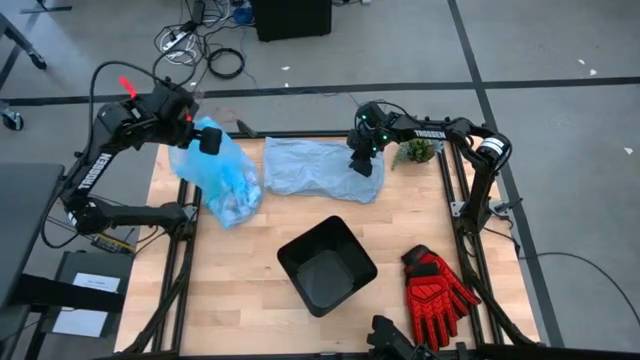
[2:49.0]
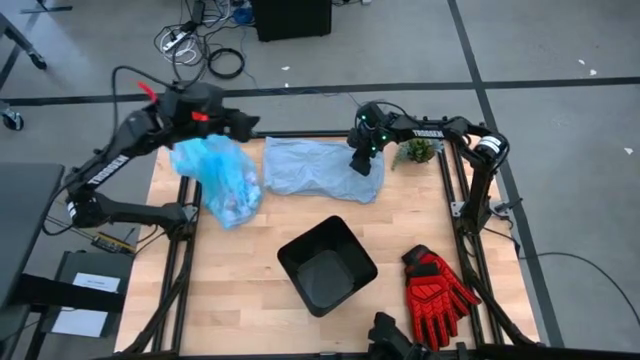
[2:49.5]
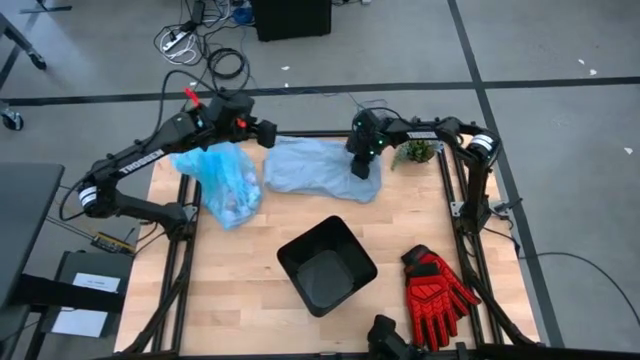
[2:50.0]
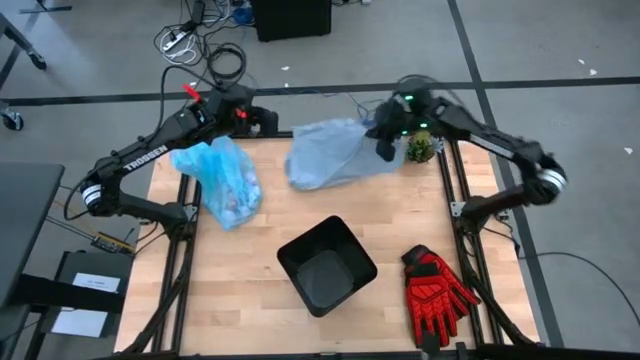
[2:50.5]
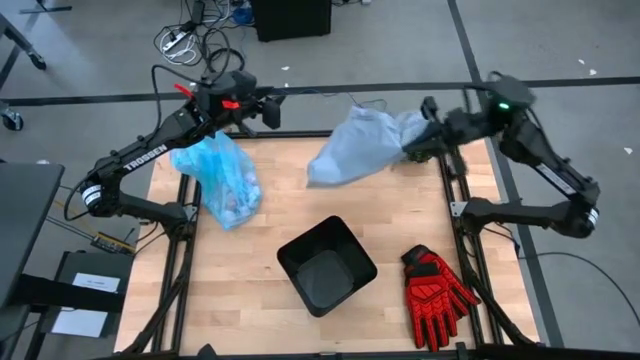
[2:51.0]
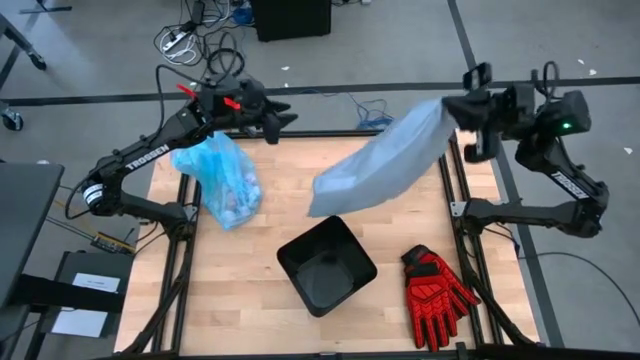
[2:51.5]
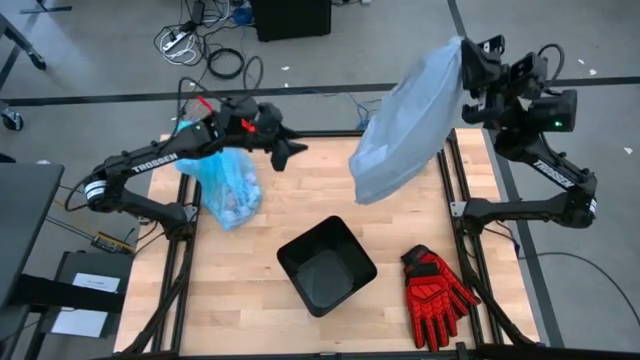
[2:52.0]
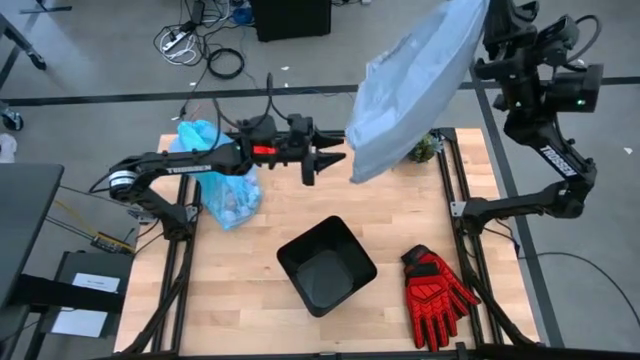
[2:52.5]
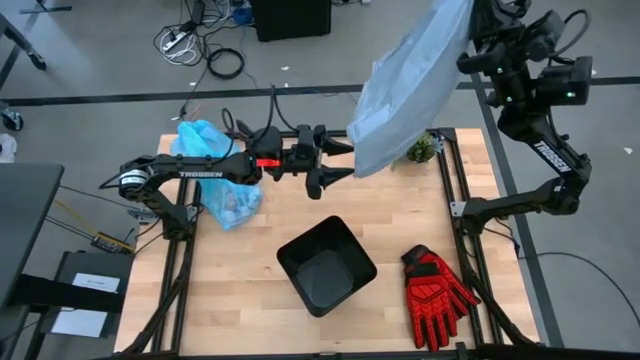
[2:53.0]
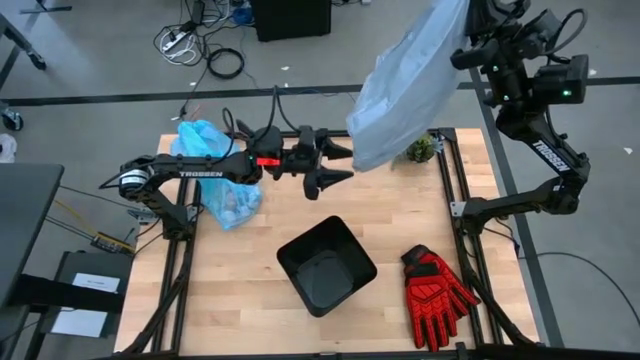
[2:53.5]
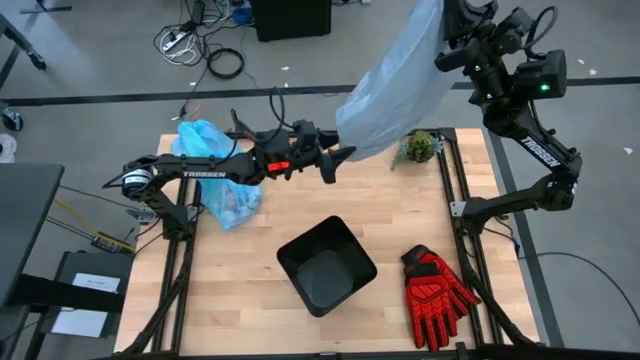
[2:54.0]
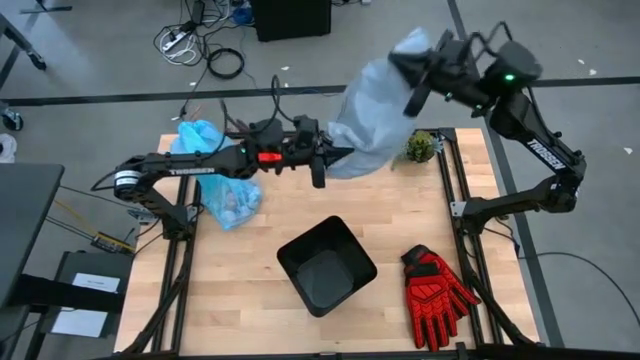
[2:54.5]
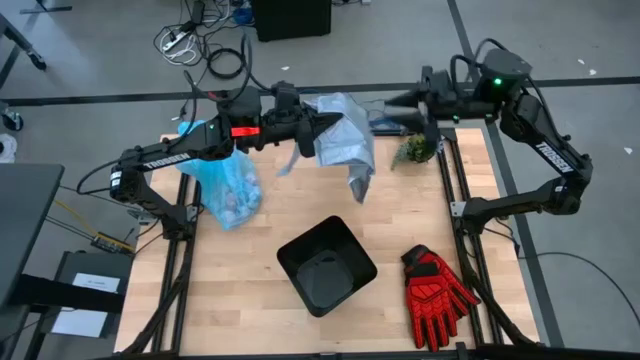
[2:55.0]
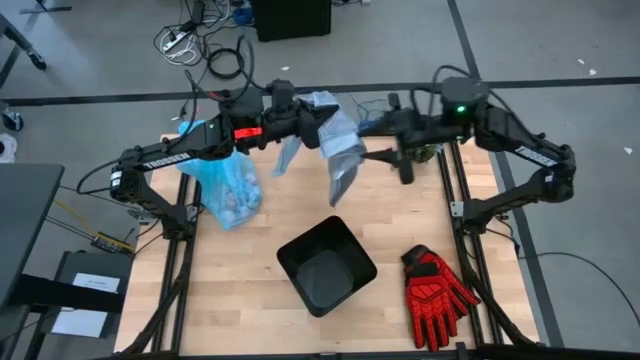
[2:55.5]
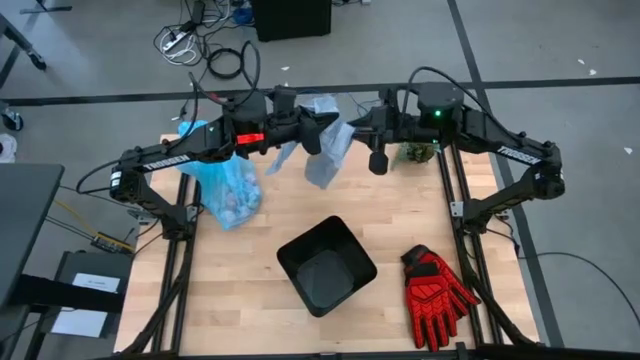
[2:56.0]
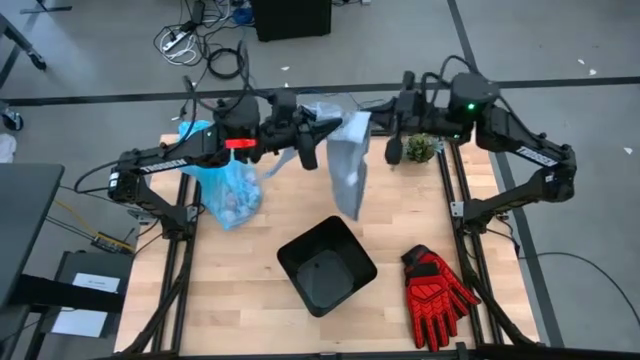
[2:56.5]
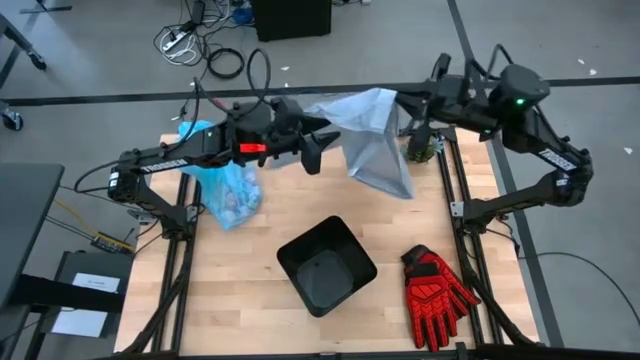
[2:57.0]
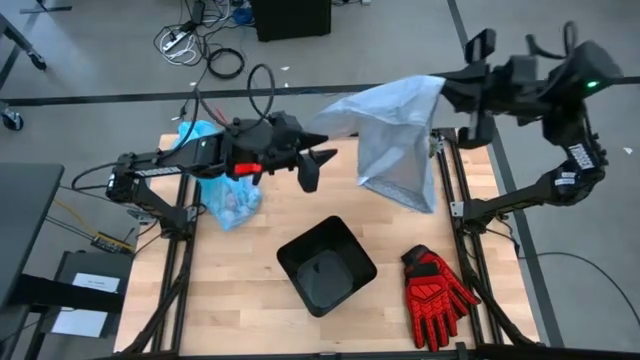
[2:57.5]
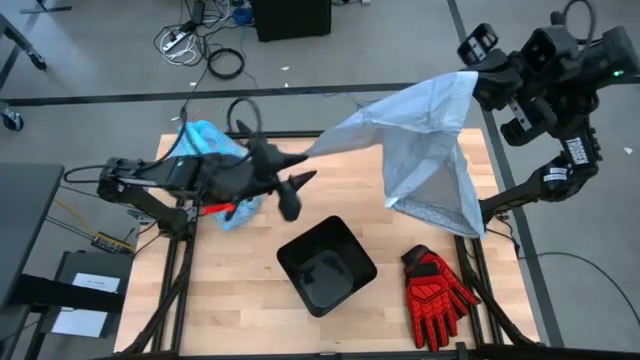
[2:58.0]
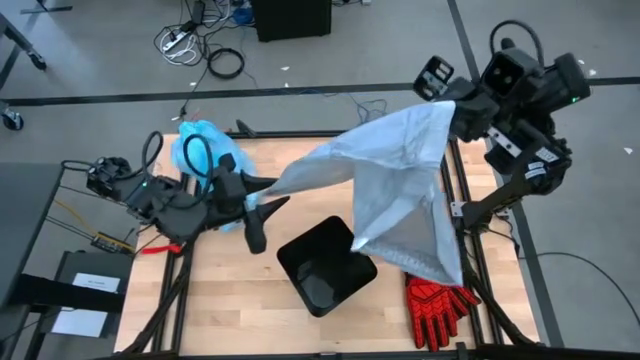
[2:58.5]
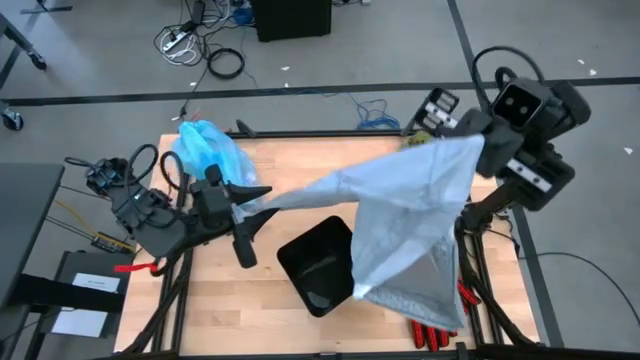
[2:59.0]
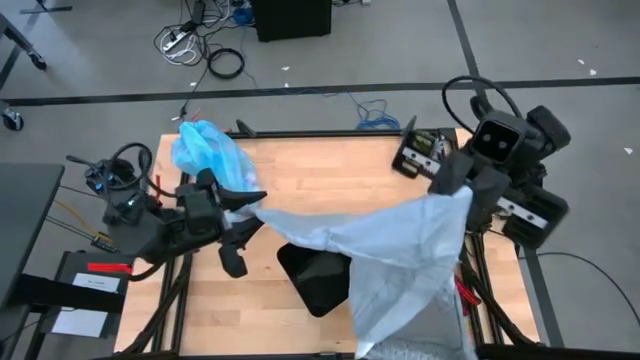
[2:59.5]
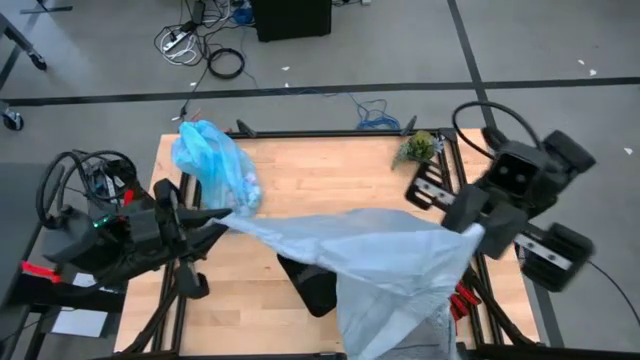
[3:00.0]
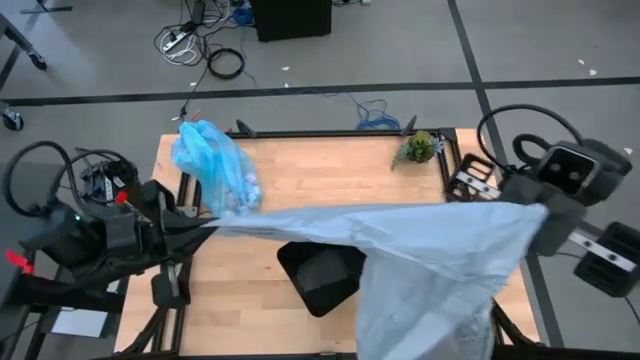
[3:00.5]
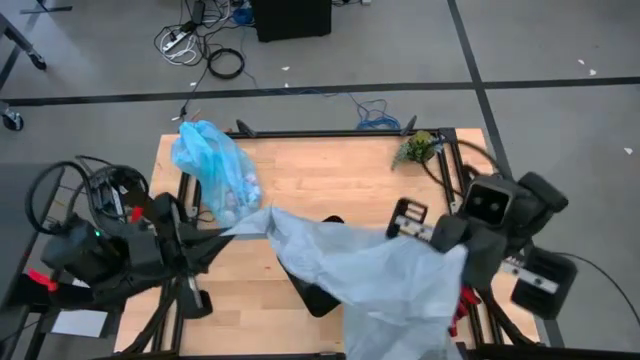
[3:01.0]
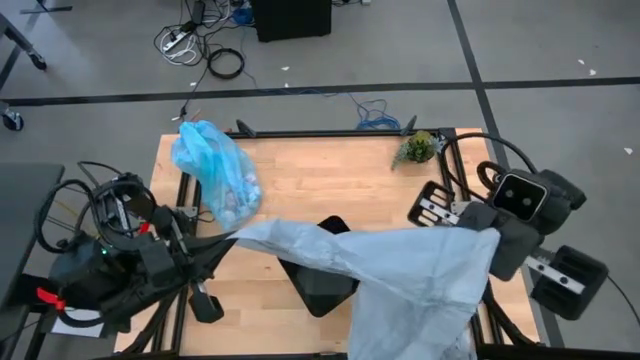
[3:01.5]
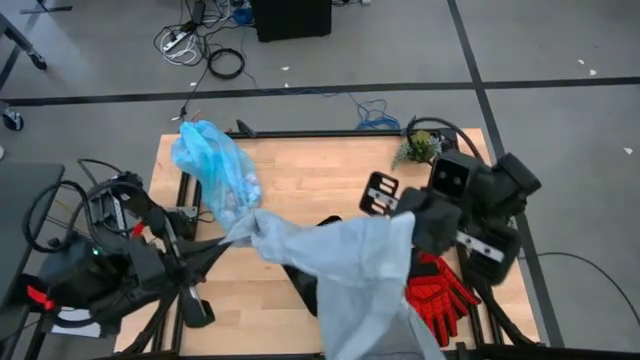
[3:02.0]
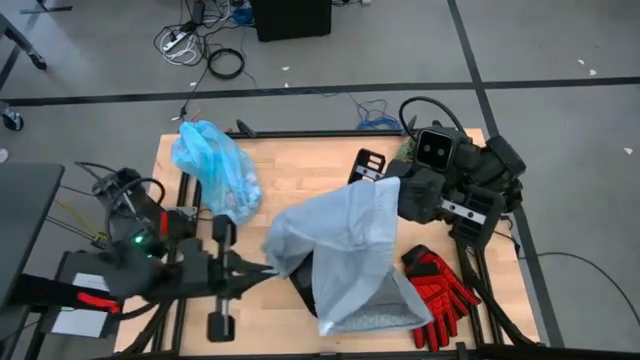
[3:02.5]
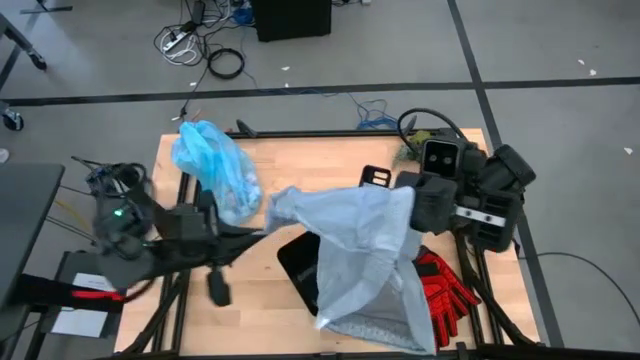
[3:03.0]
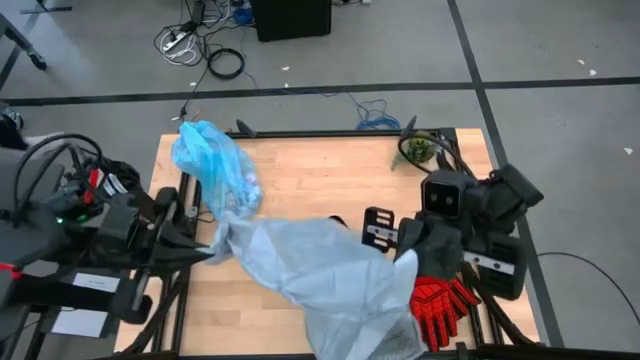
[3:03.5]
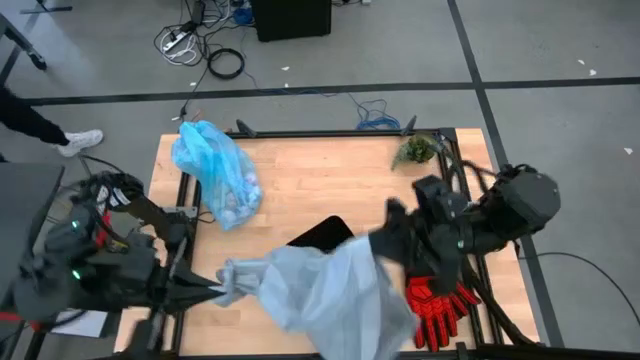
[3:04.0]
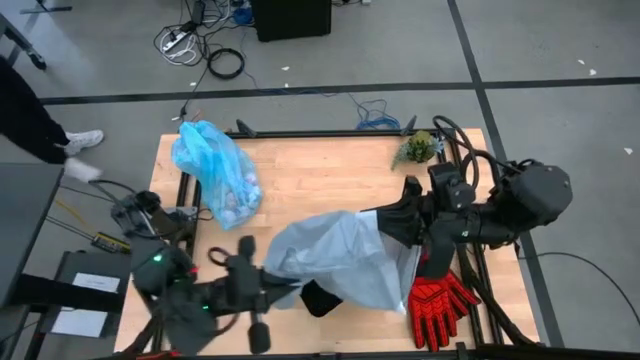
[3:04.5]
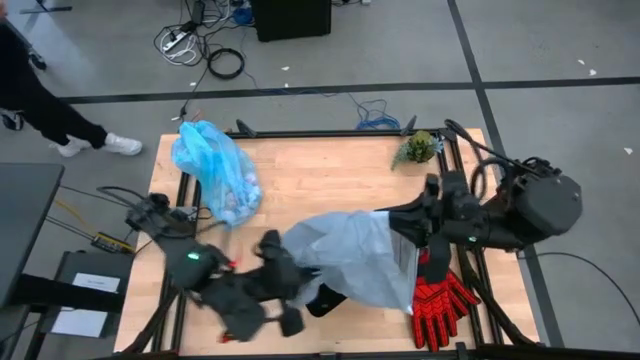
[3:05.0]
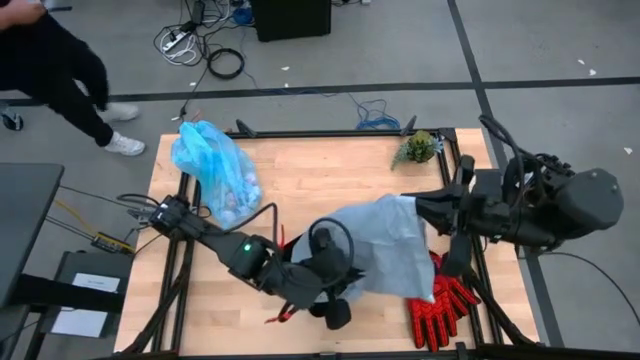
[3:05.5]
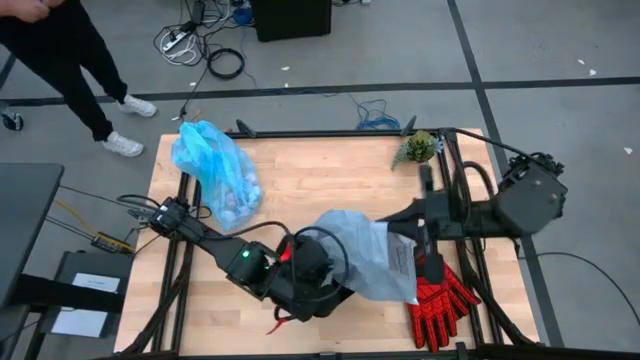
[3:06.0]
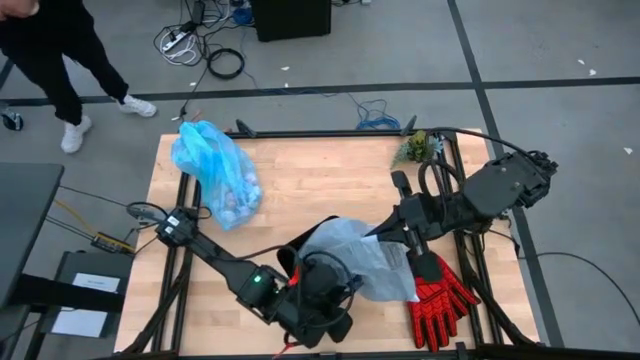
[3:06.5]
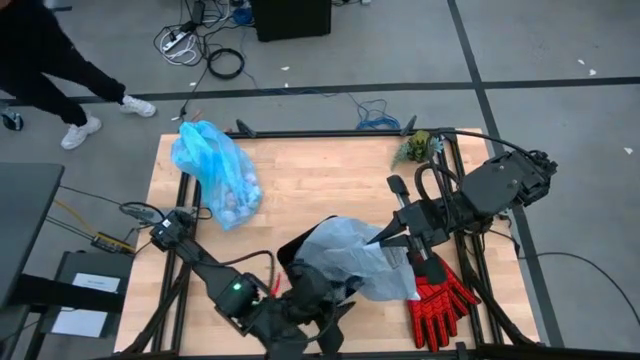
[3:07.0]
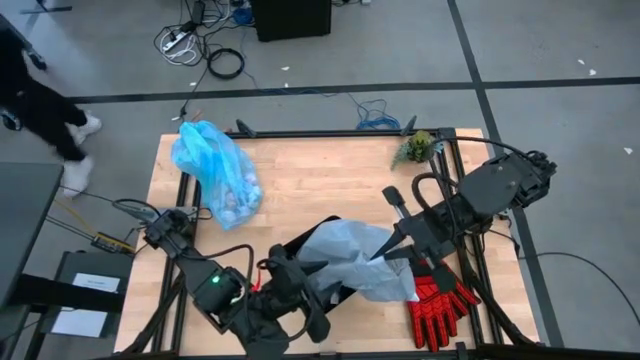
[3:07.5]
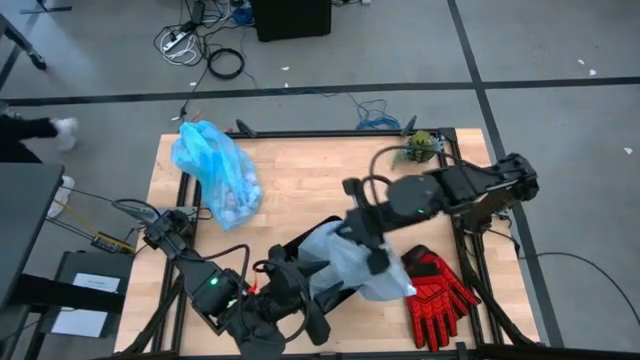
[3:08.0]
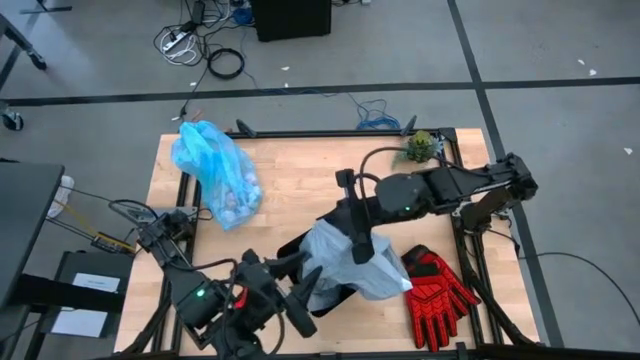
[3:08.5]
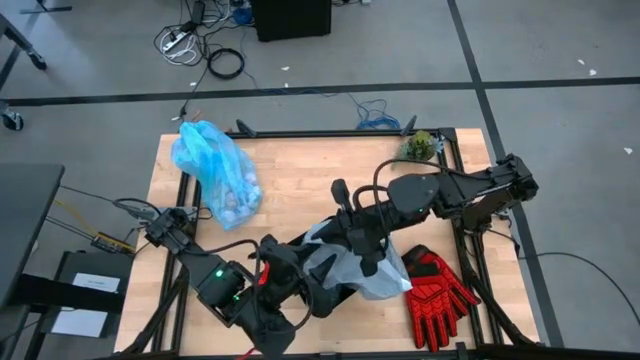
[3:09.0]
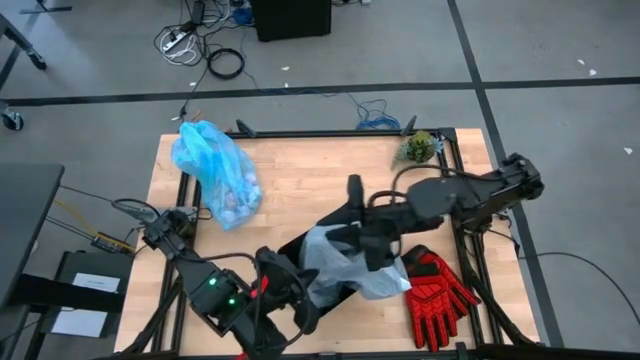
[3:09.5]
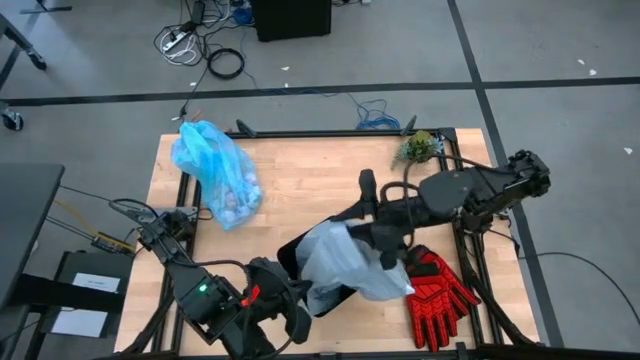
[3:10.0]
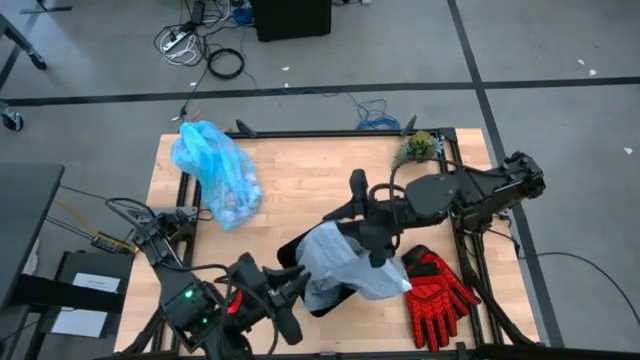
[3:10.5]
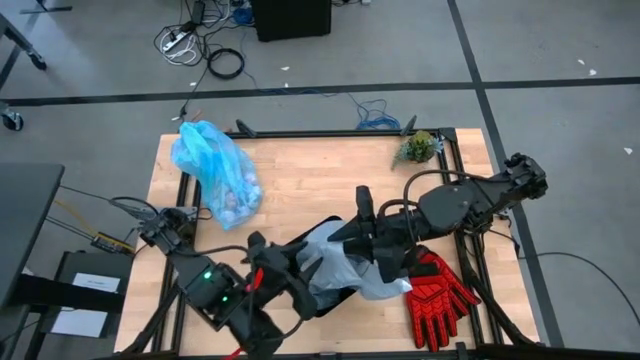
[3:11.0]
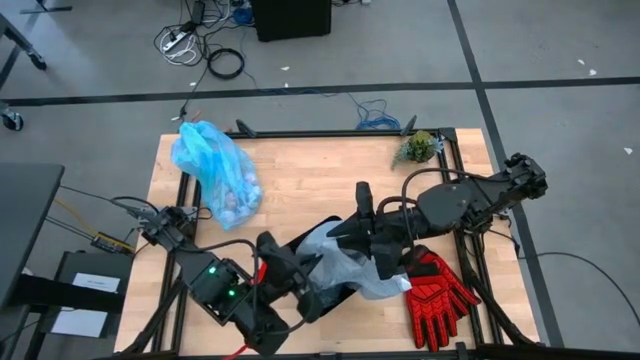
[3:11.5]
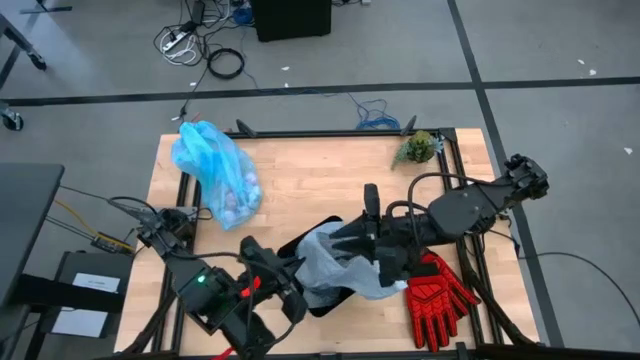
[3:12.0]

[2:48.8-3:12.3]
Task: place trash/remove bag and relplace
Put the gray trash bag into the trash bin
